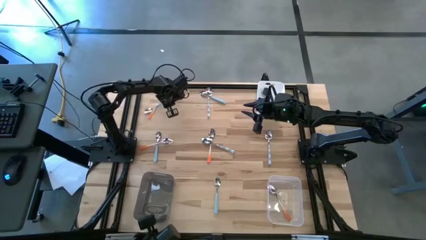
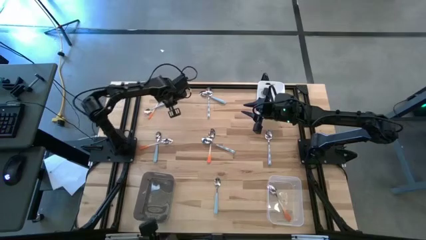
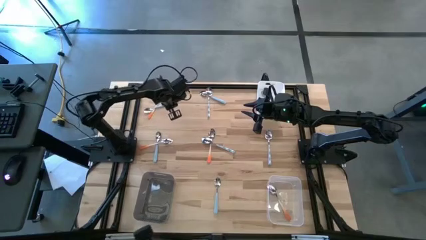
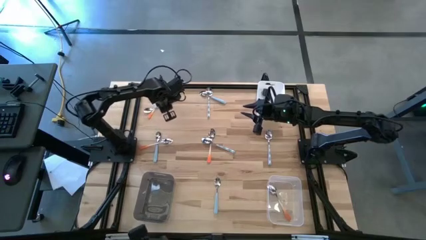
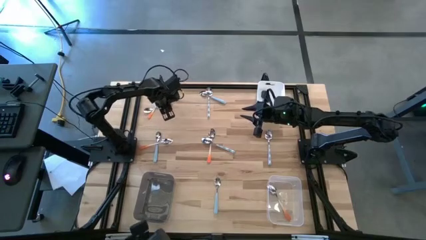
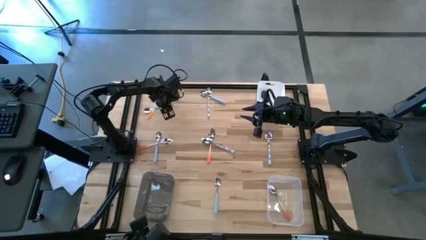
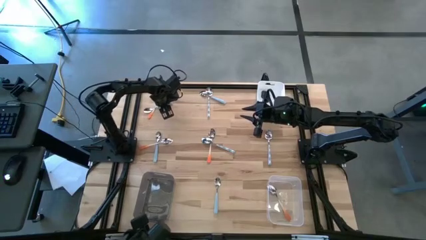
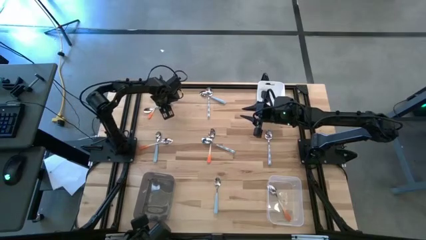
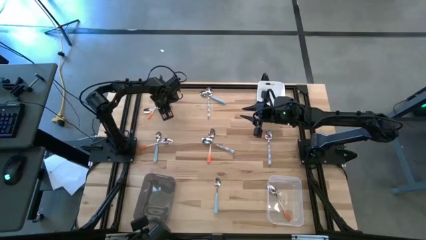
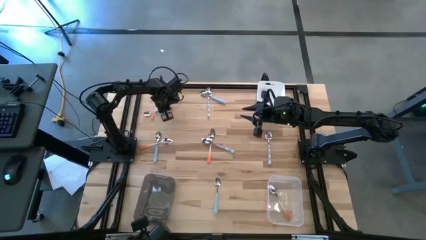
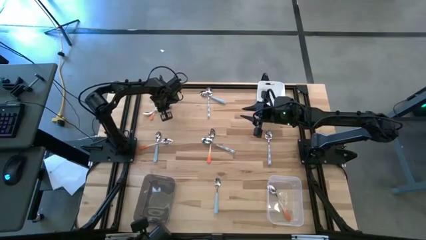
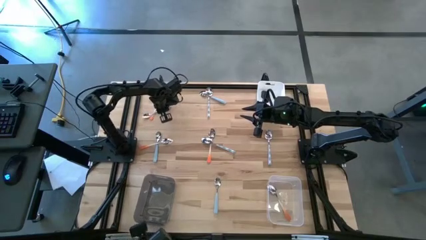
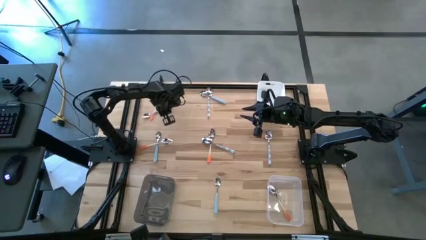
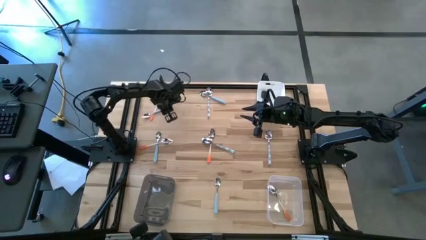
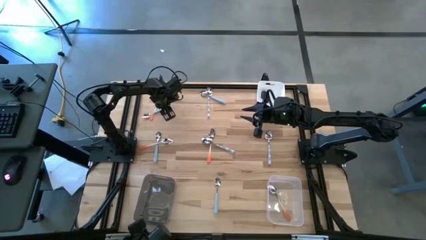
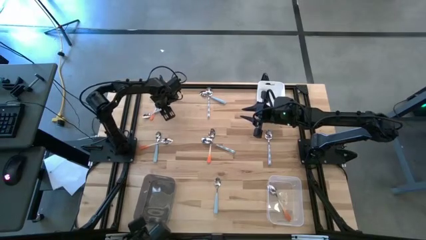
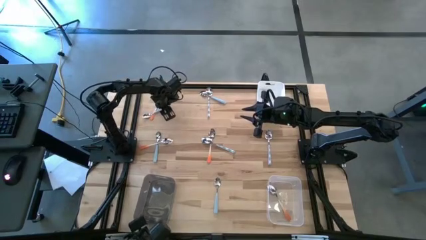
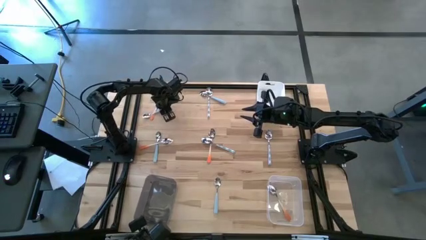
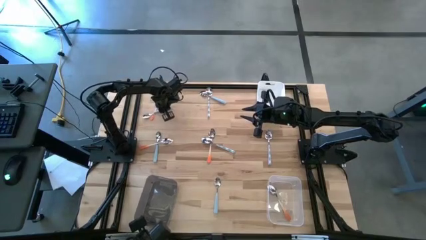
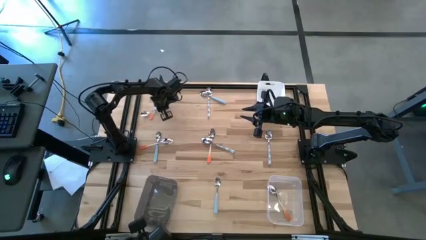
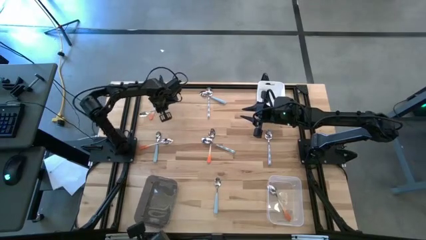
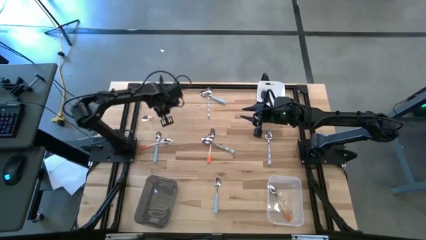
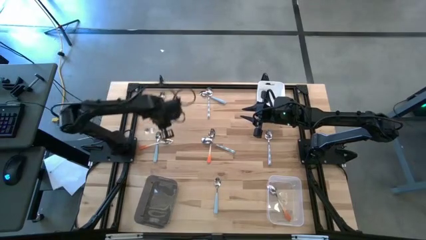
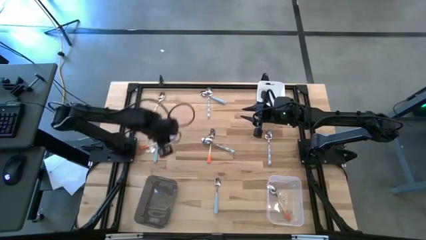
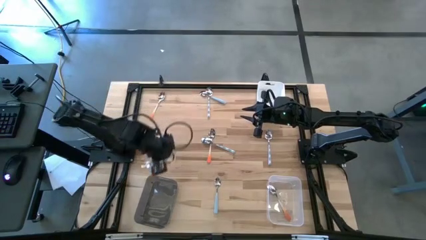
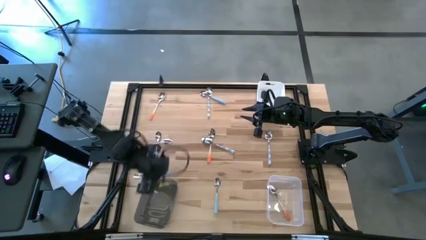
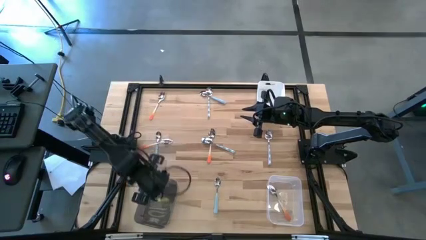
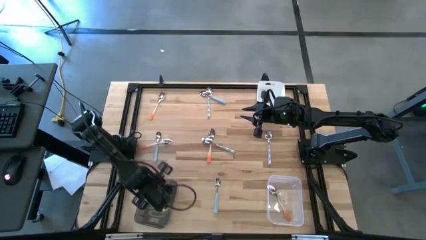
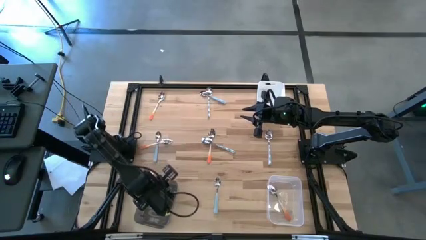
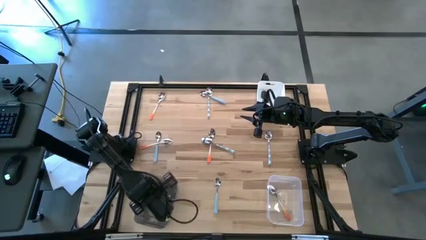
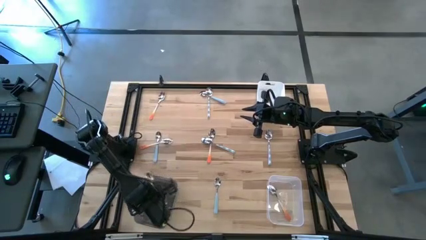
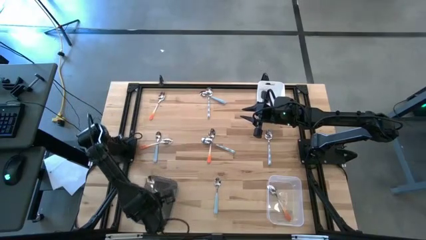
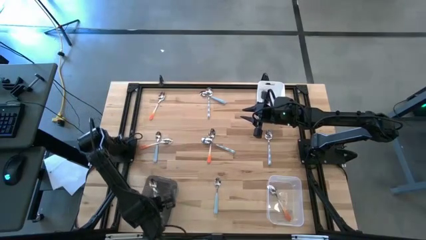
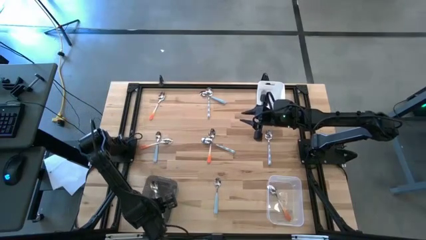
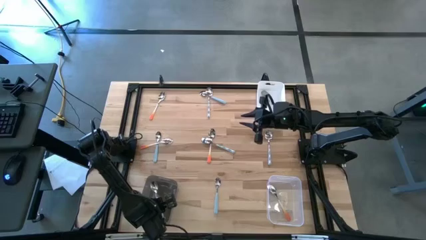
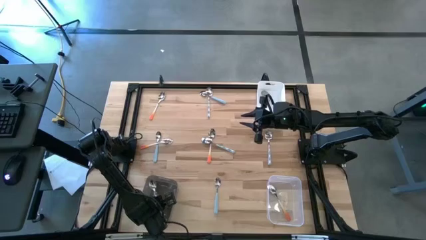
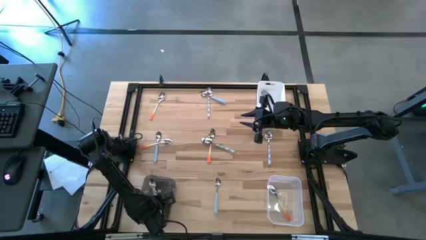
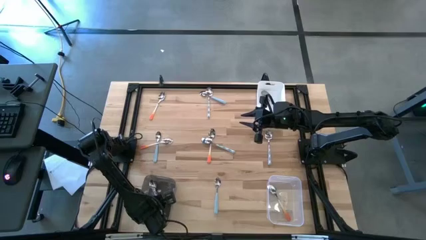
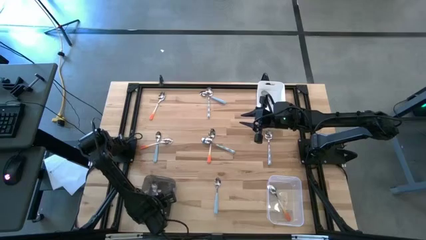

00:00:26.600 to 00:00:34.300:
Task: Sort silverware by color (type)
Put the light blue spoon into the black bin

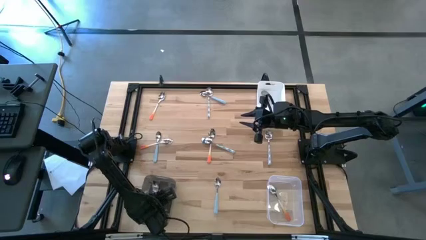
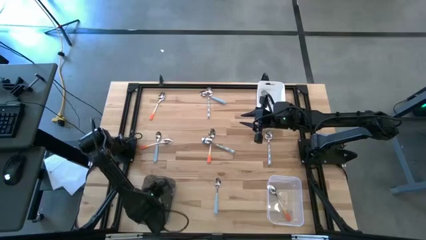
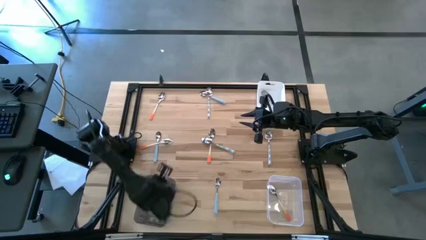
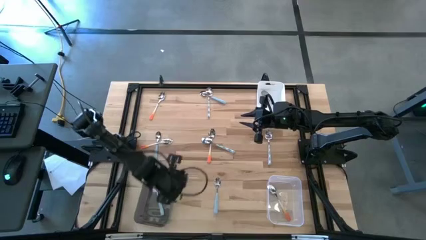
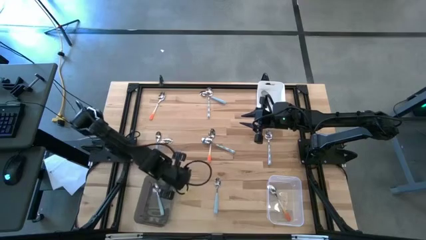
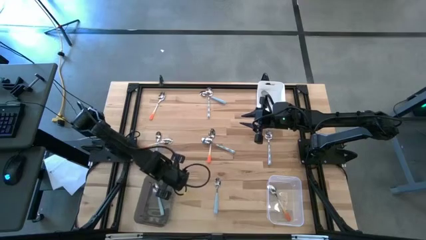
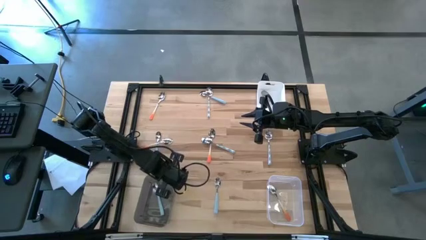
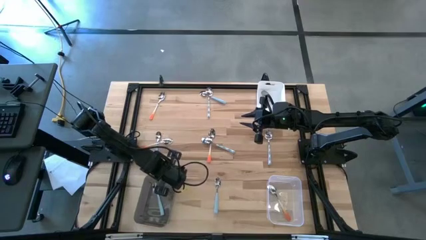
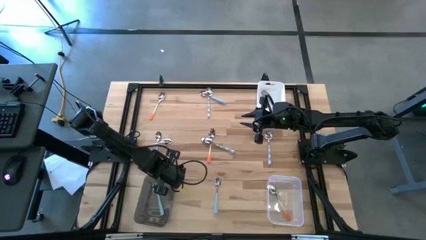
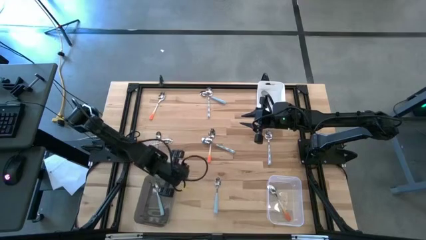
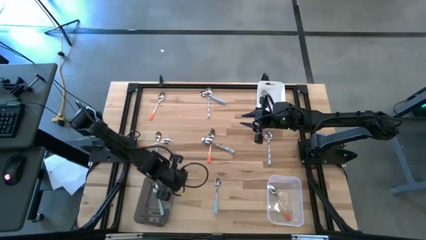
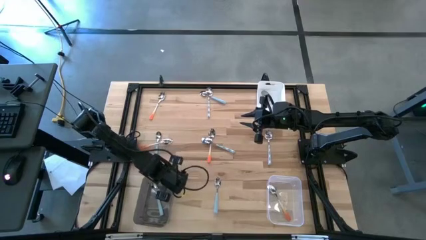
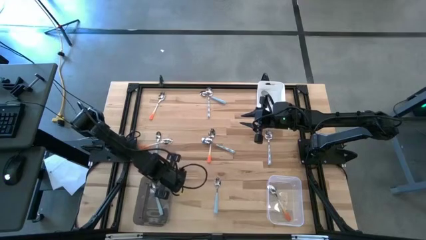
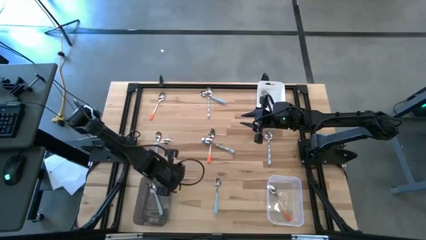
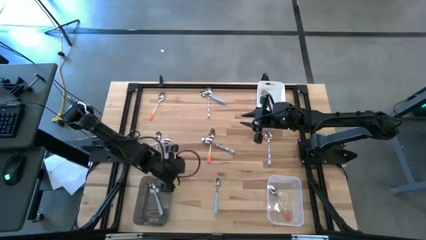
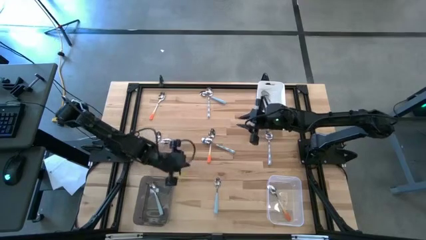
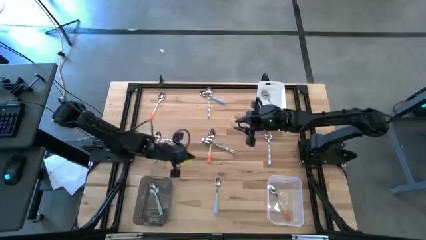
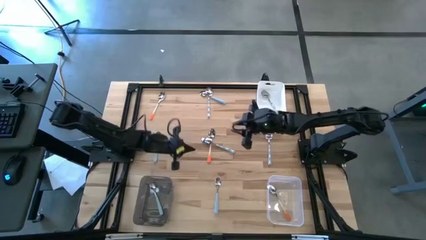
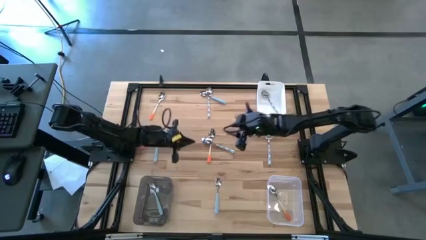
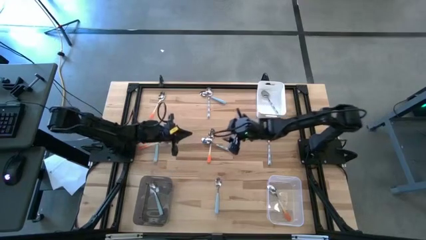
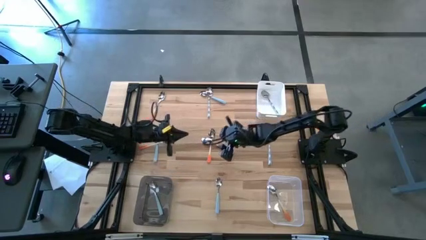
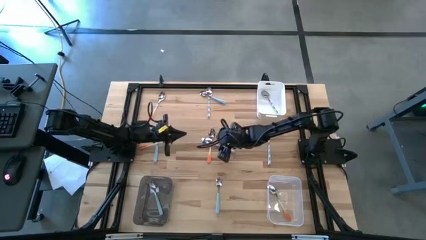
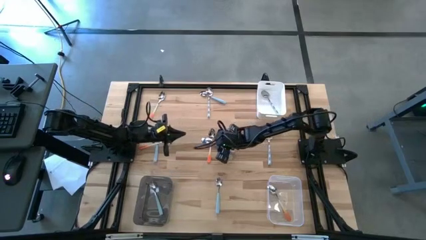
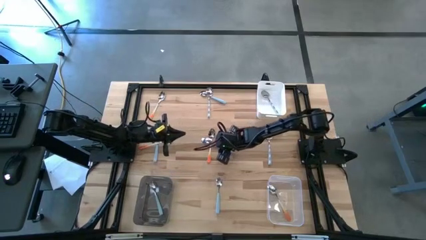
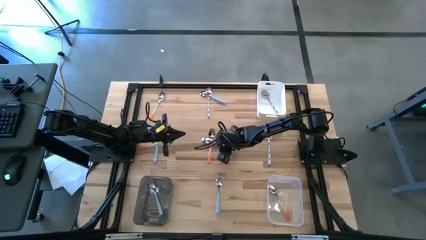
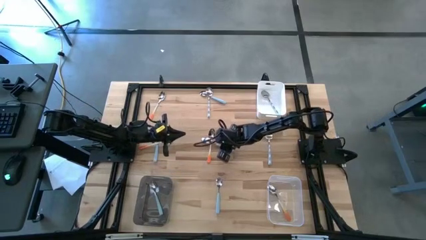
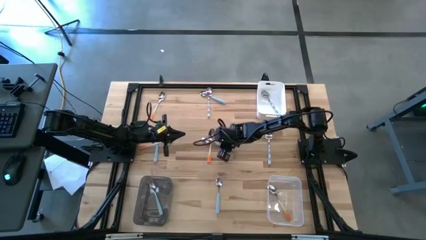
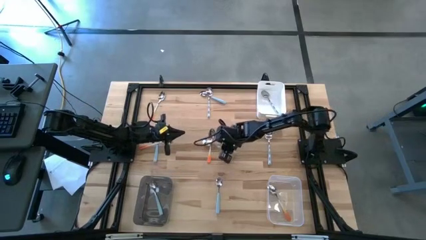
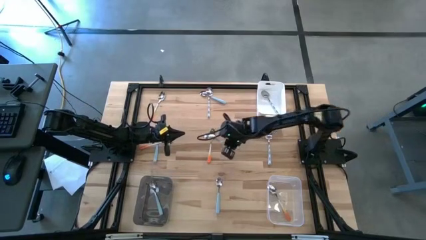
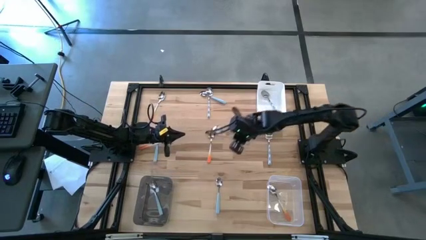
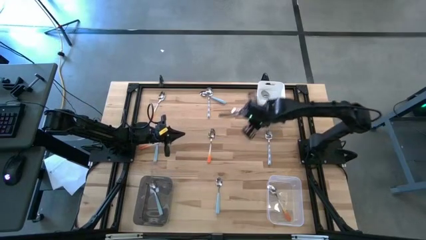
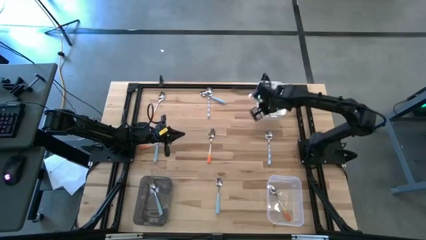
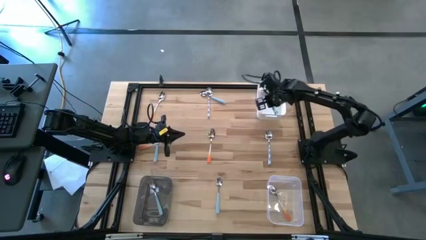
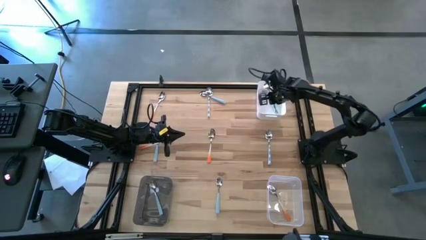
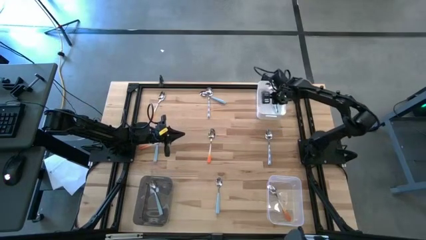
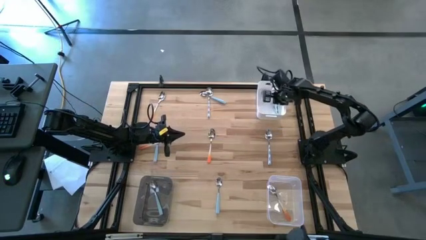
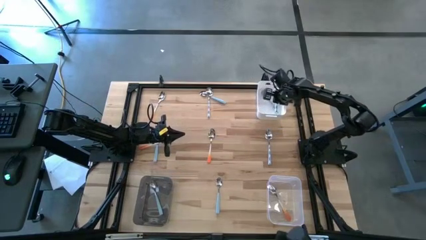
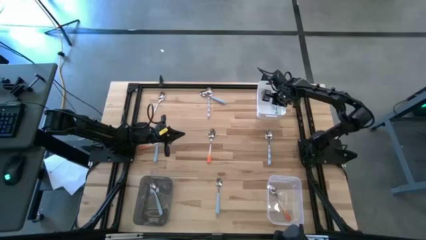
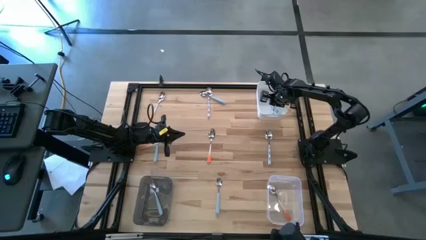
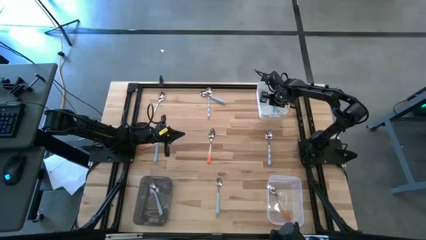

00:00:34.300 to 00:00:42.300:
Put the white spoon into the white bin
